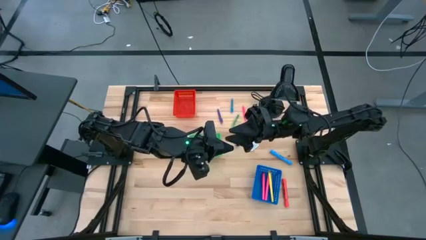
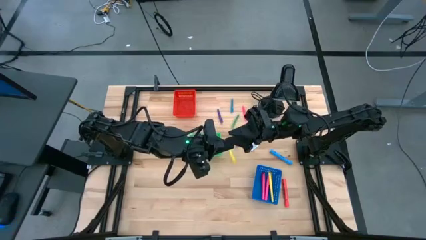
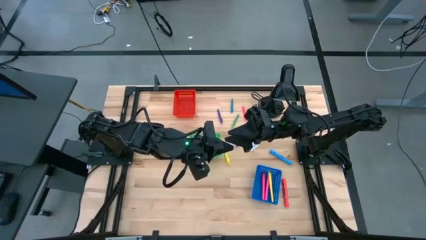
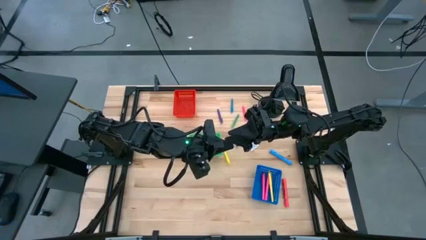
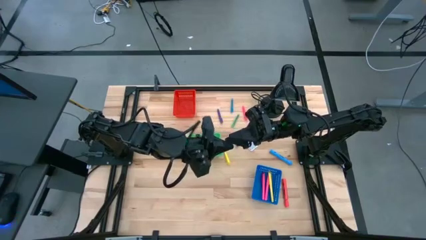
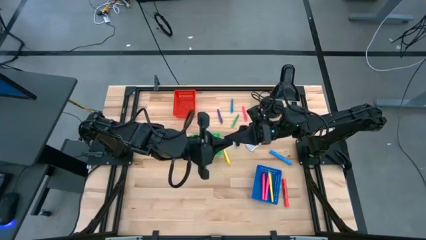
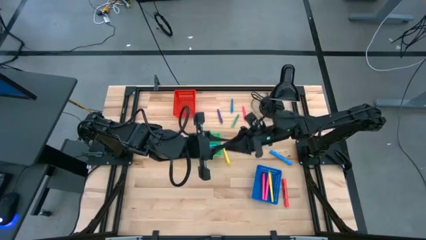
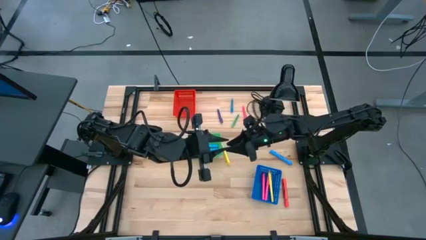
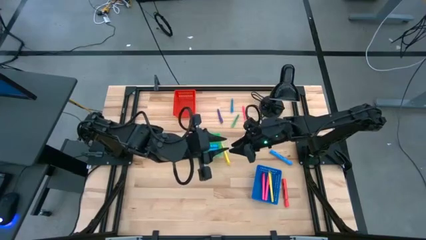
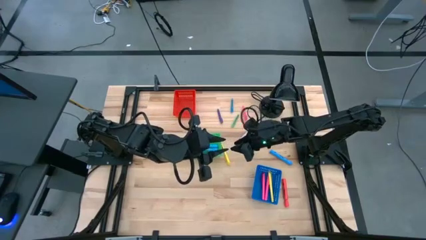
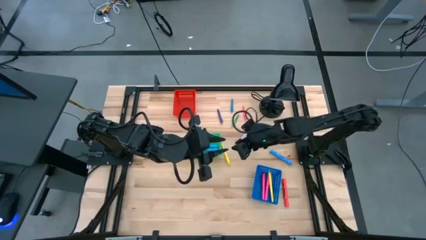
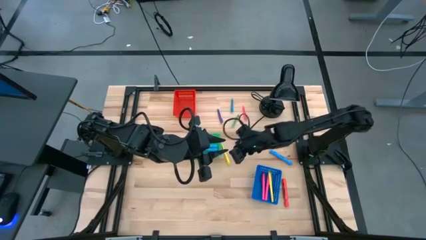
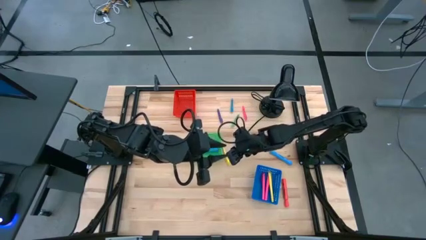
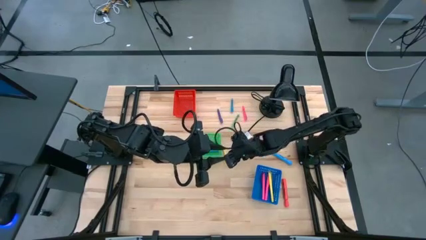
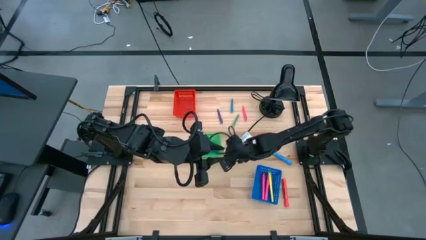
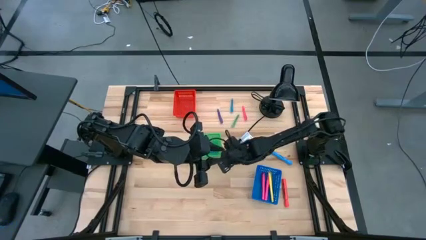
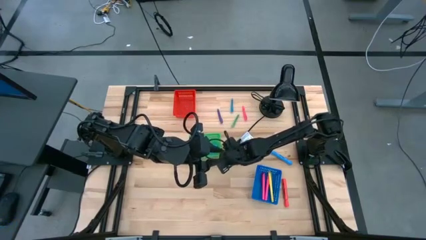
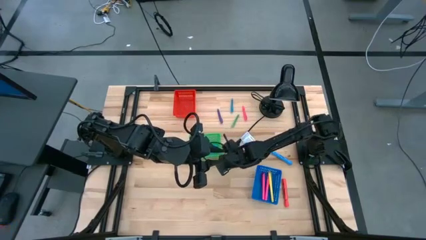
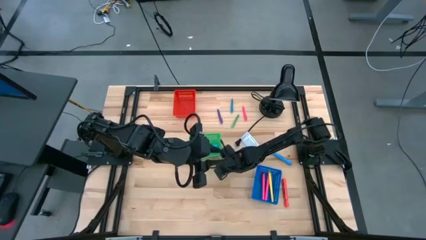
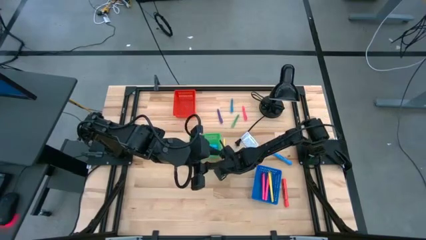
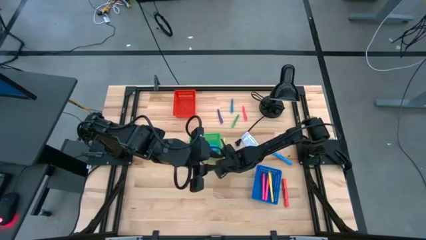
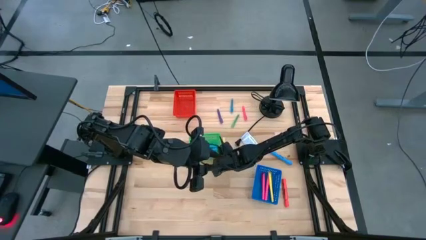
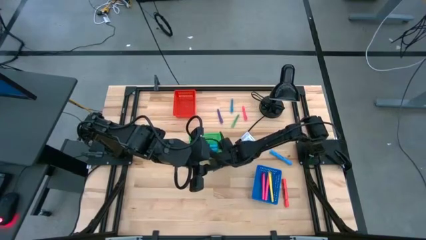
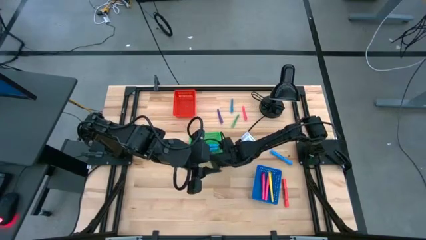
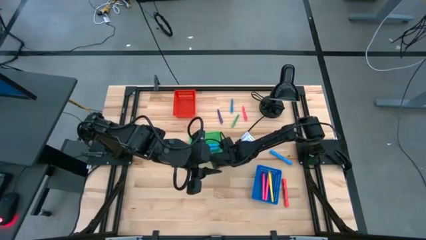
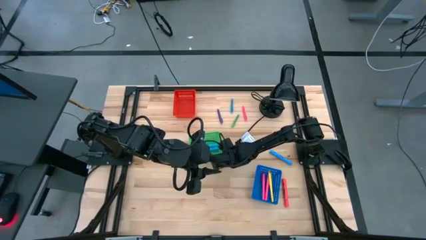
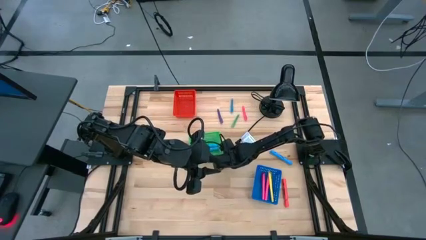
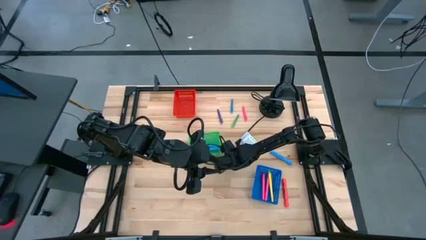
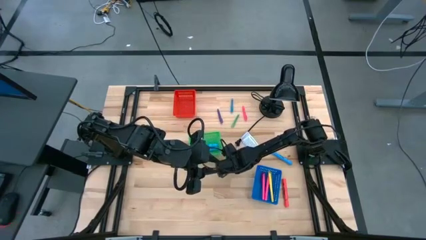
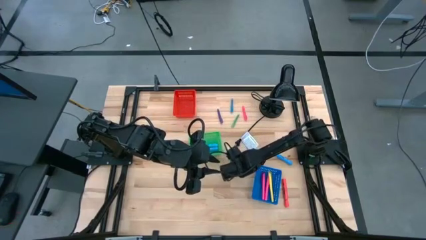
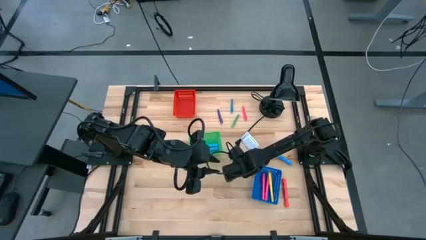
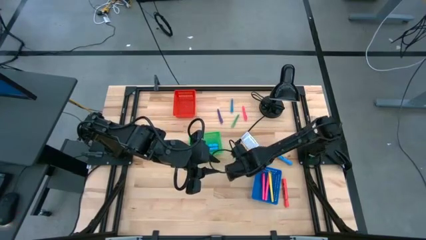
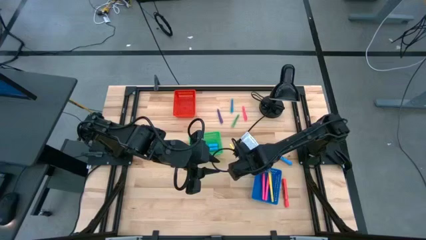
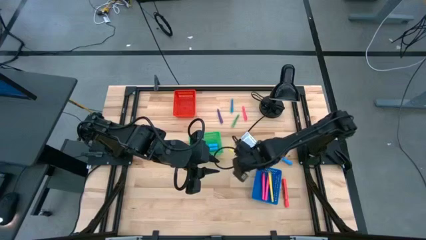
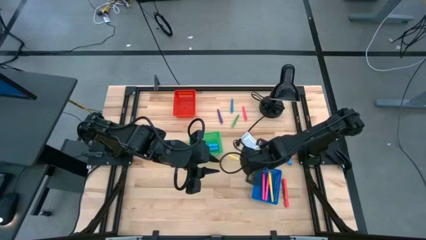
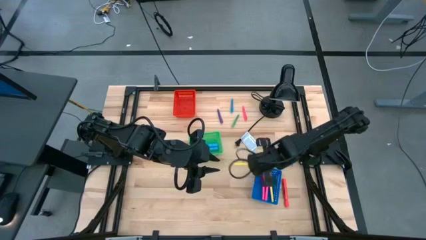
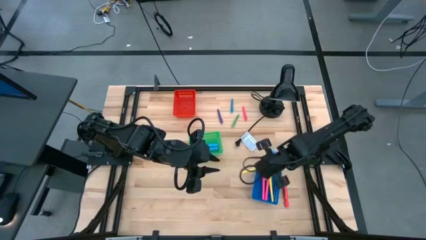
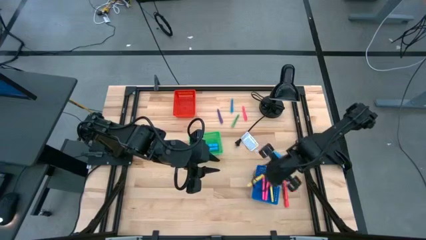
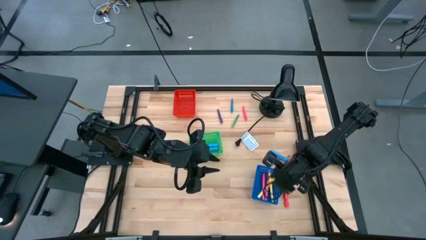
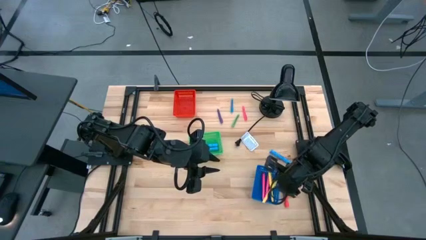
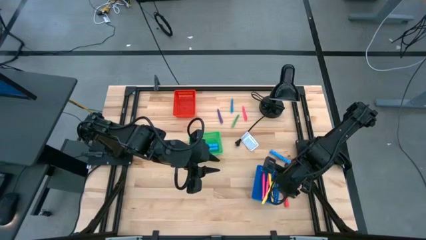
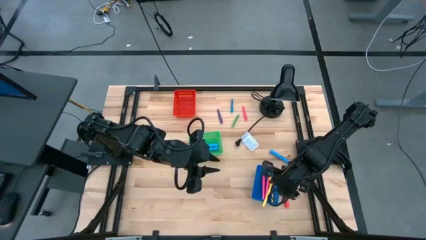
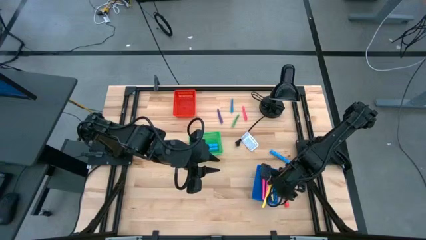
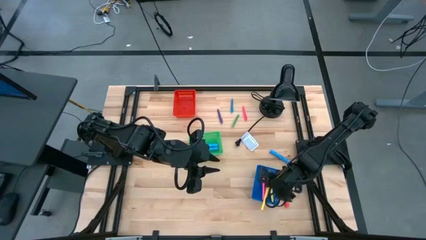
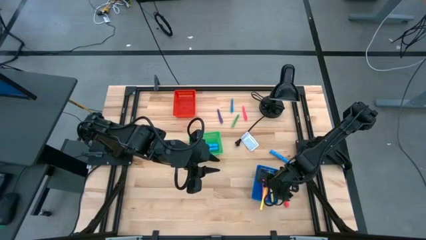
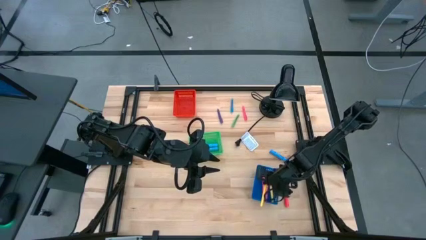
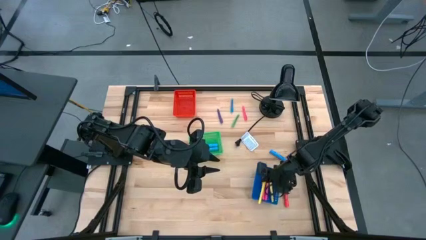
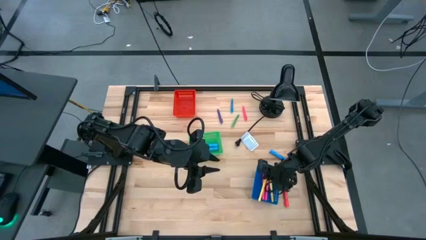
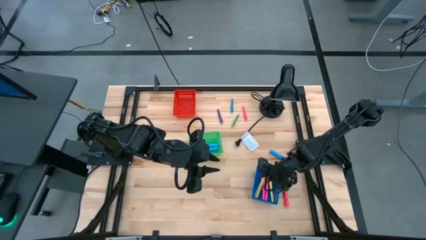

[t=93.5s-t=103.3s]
Task: Pick & Place Markers
Put the large yellow pen into the blue bin

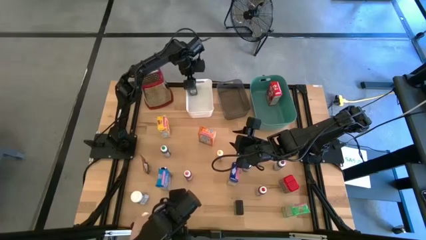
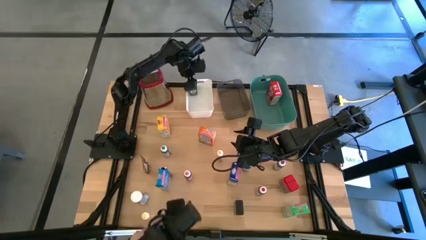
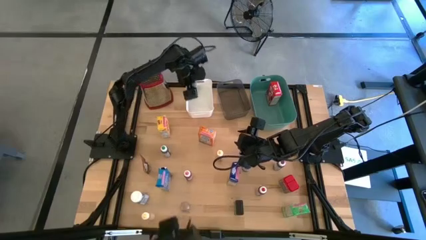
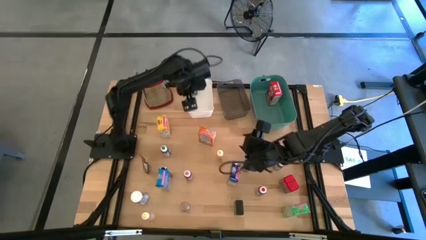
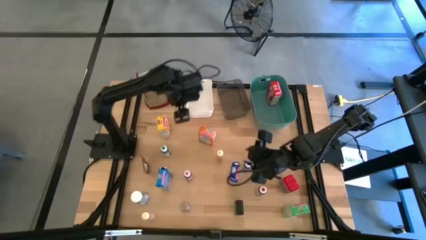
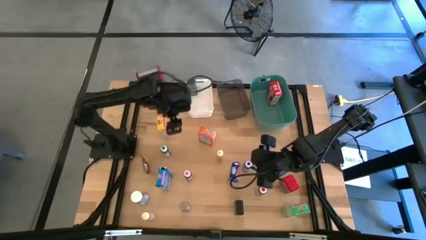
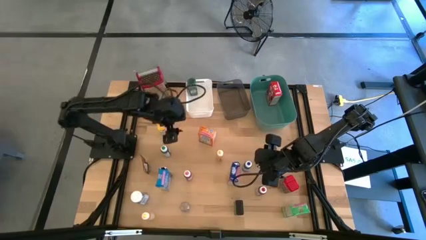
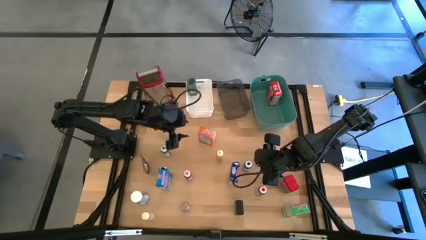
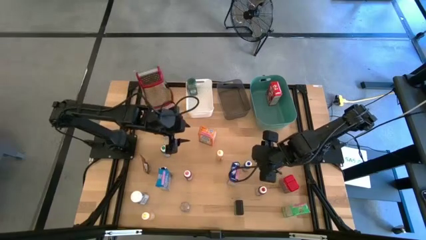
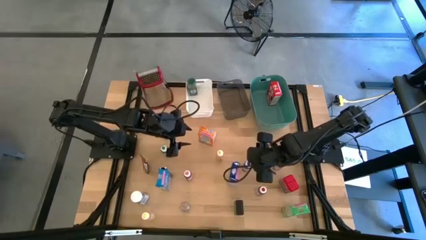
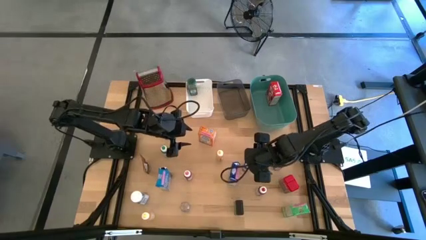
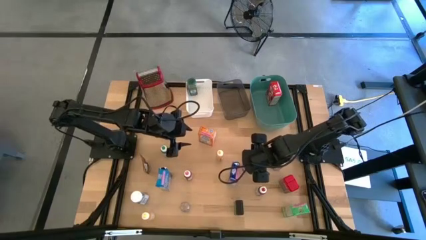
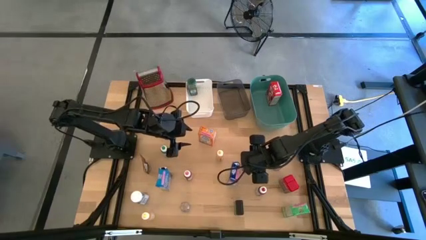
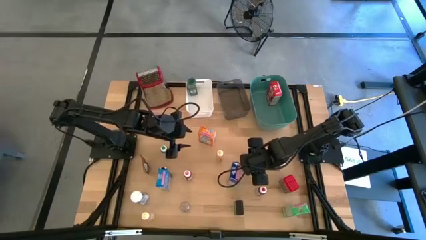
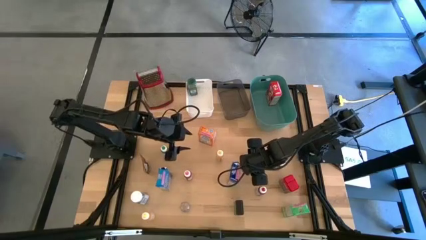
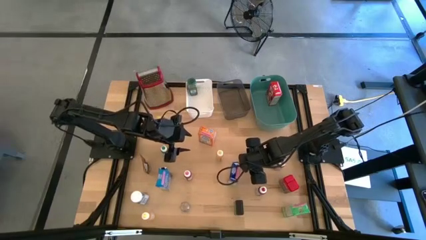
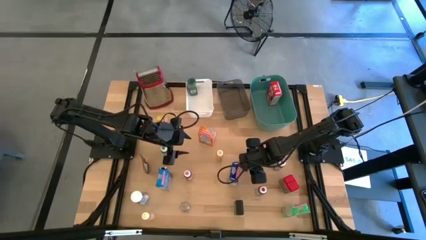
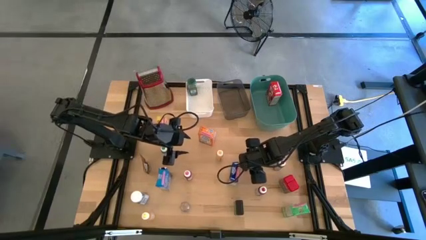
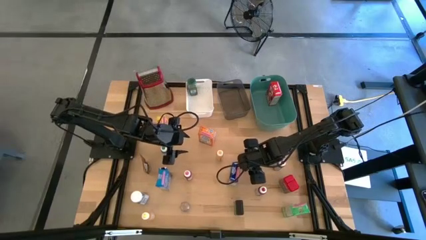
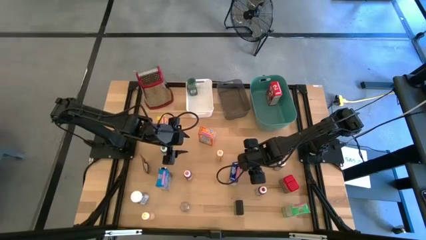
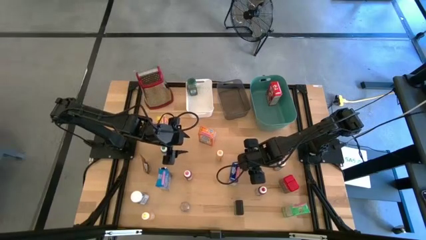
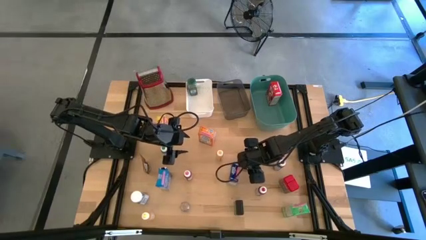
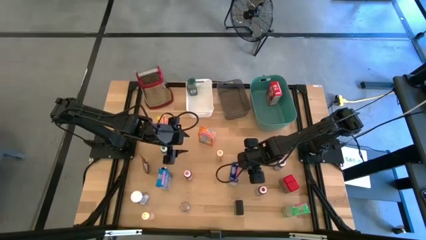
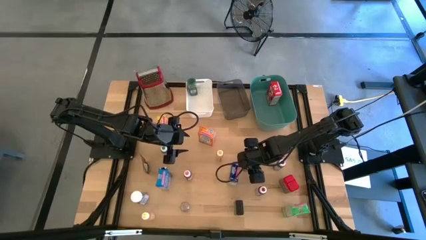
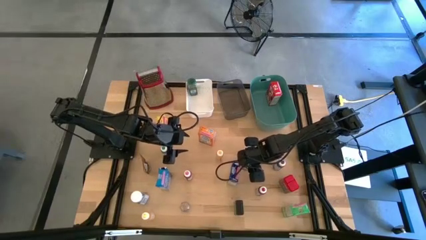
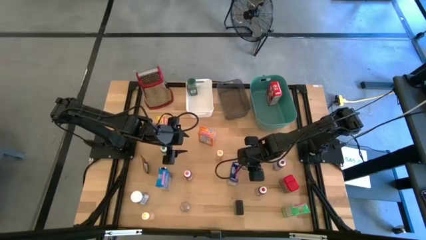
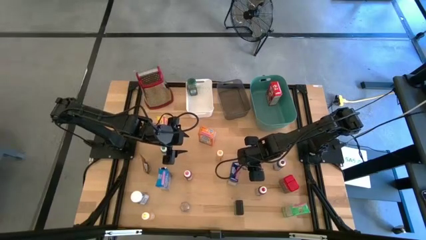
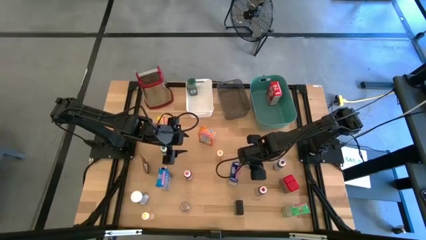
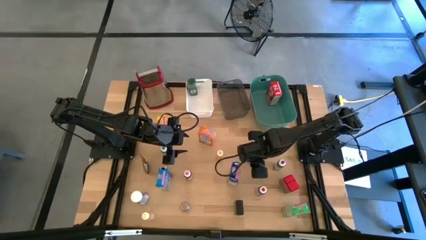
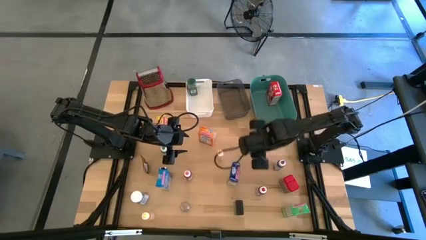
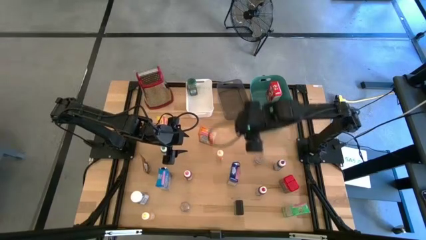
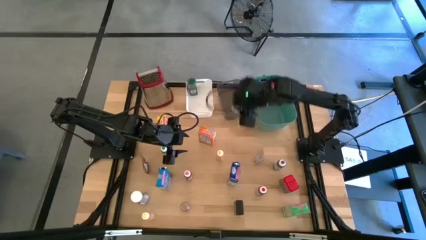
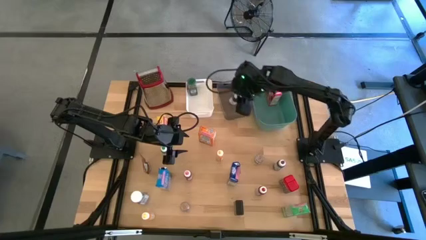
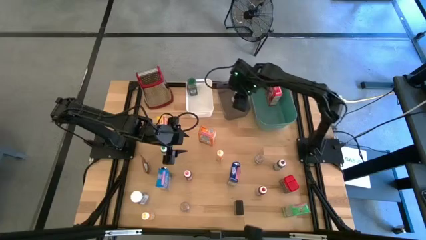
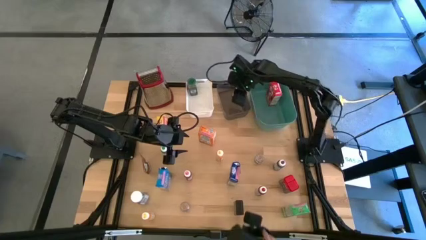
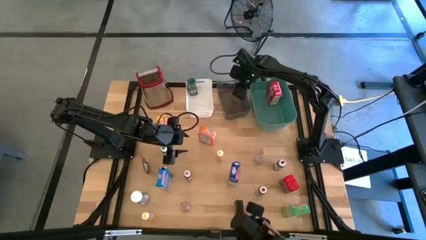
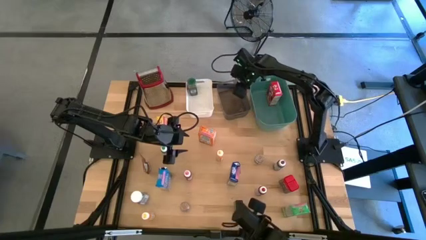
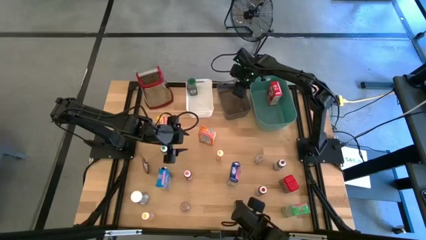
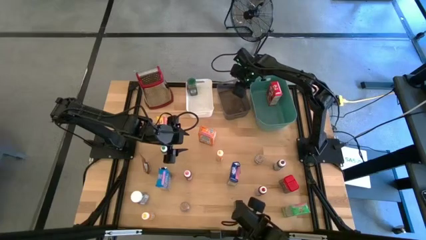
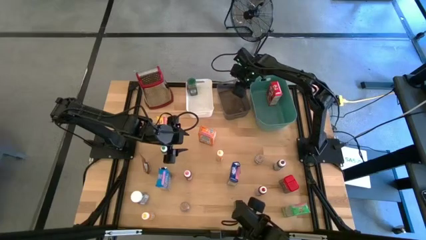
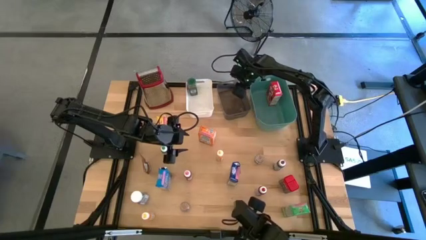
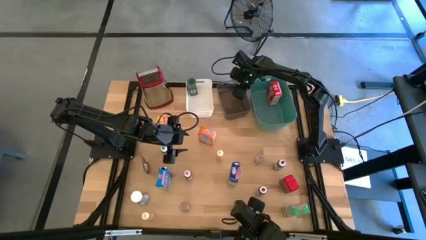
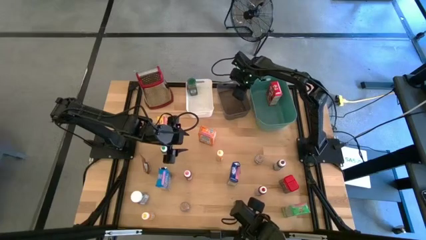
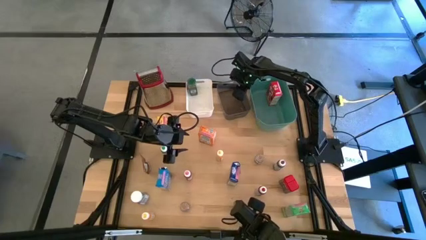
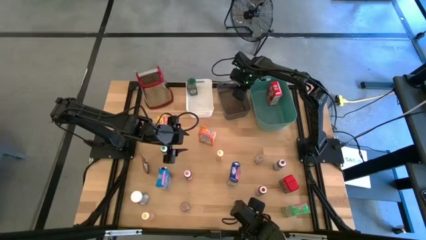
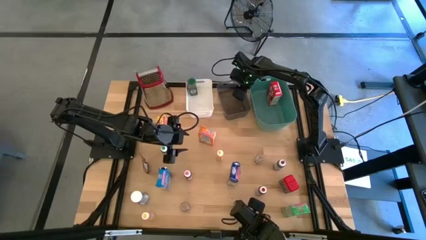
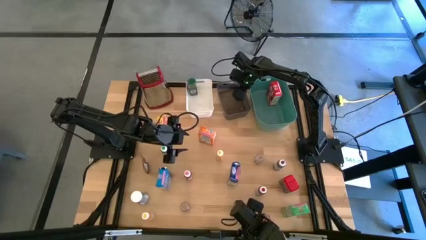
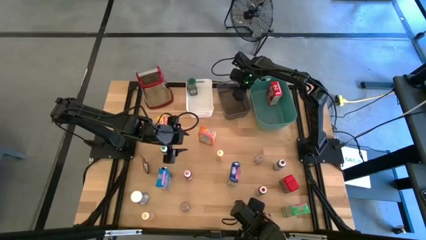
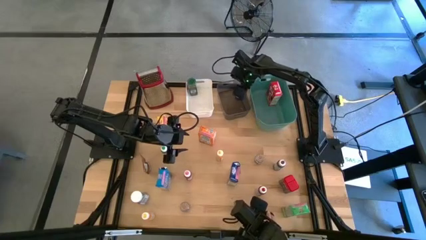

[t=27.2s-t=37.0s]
Task: Pick & Place Kitchen Items
Put the blue food coloring bottle into the black bin
